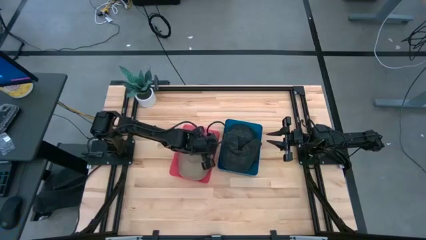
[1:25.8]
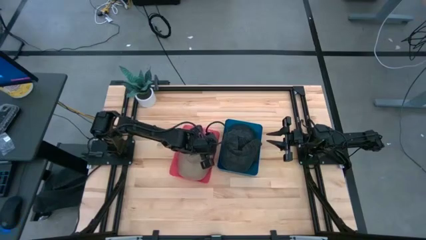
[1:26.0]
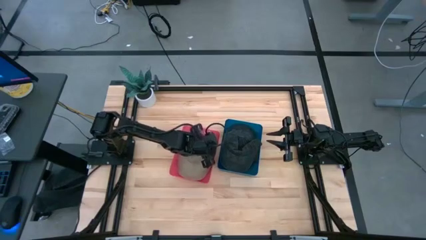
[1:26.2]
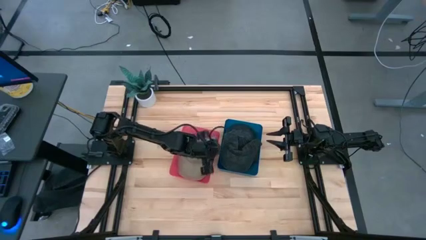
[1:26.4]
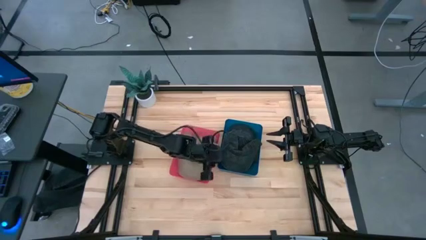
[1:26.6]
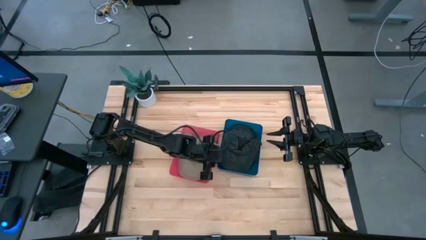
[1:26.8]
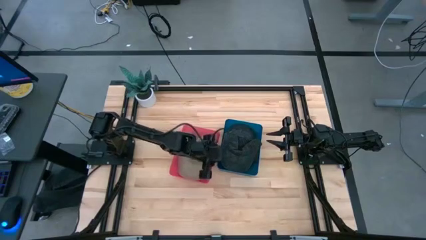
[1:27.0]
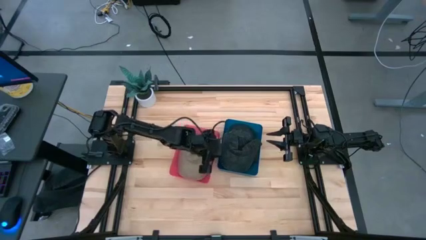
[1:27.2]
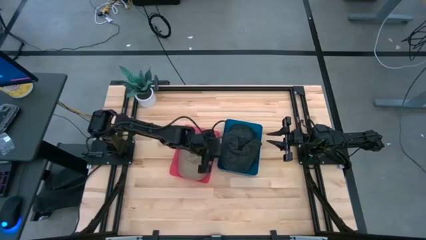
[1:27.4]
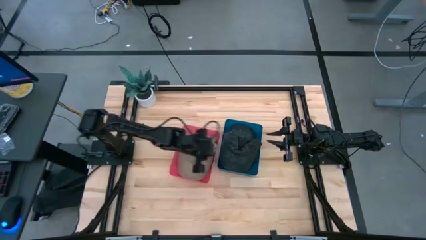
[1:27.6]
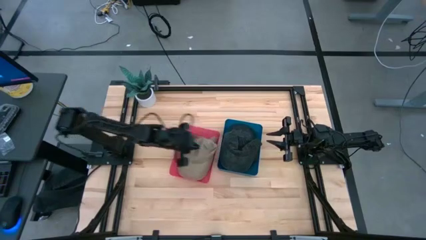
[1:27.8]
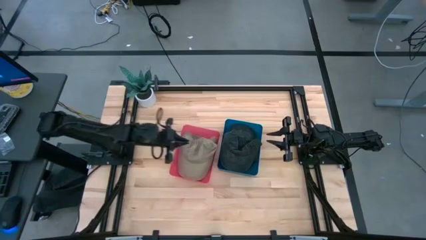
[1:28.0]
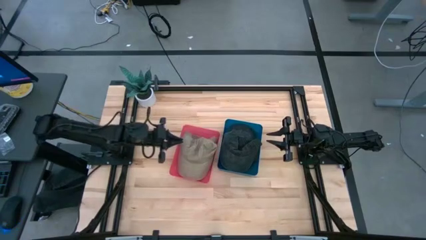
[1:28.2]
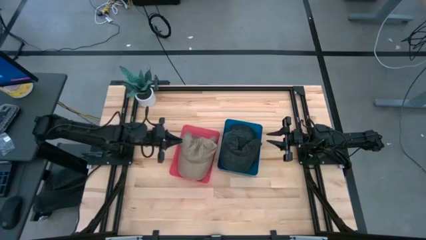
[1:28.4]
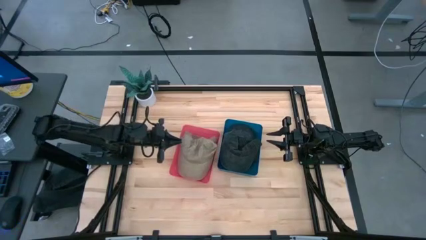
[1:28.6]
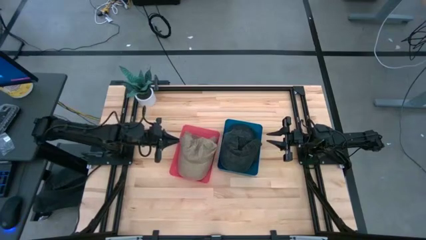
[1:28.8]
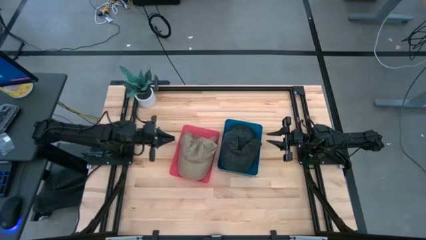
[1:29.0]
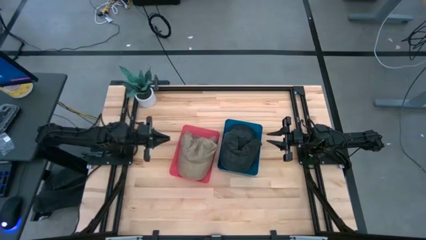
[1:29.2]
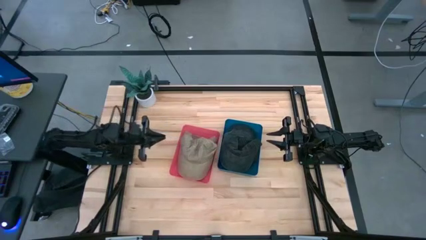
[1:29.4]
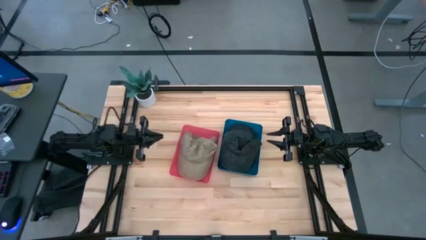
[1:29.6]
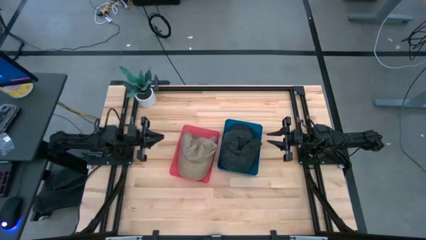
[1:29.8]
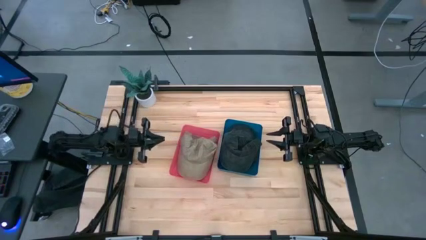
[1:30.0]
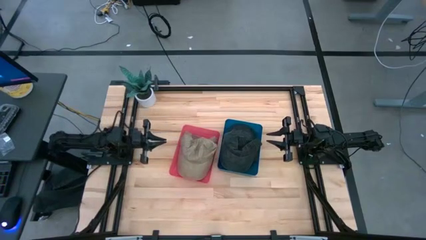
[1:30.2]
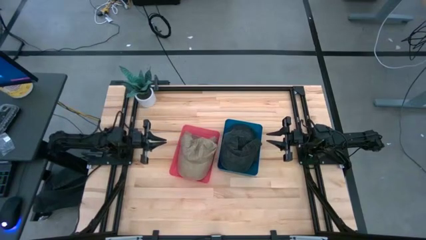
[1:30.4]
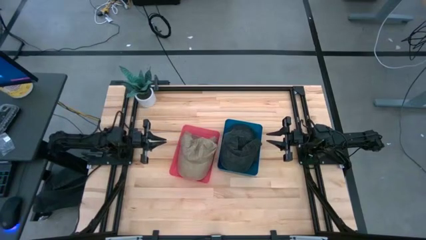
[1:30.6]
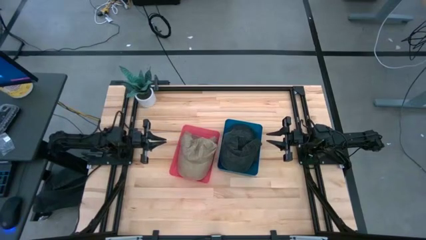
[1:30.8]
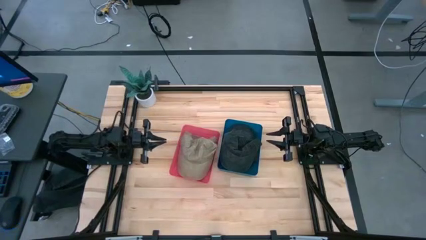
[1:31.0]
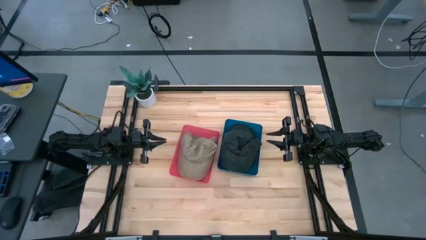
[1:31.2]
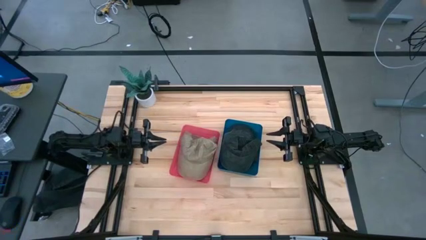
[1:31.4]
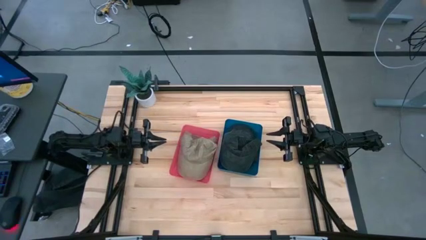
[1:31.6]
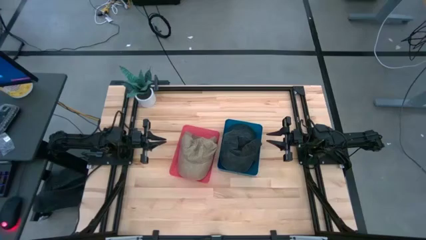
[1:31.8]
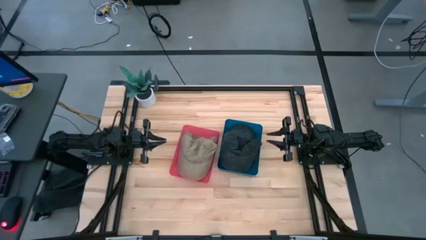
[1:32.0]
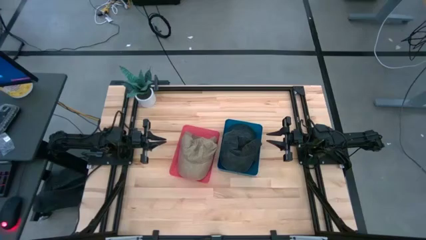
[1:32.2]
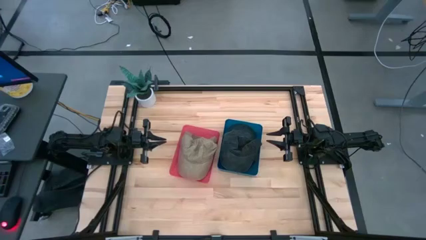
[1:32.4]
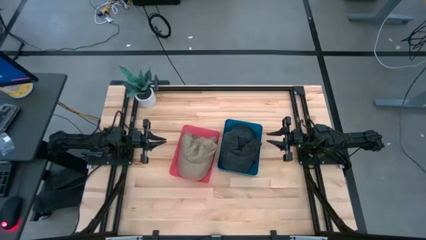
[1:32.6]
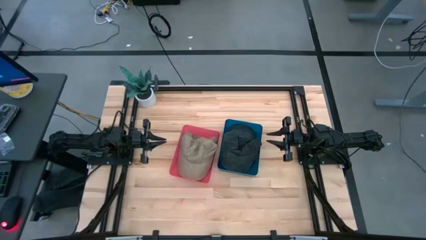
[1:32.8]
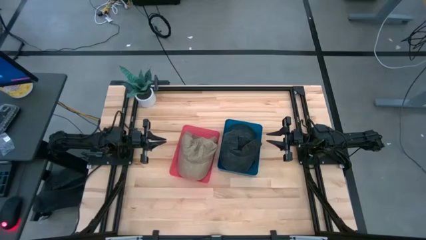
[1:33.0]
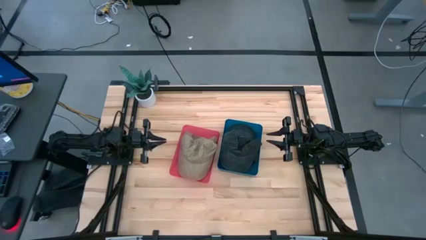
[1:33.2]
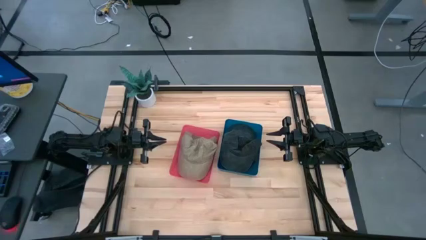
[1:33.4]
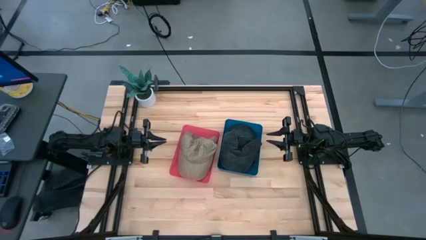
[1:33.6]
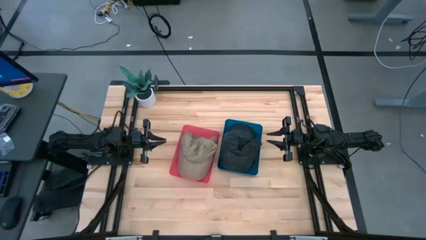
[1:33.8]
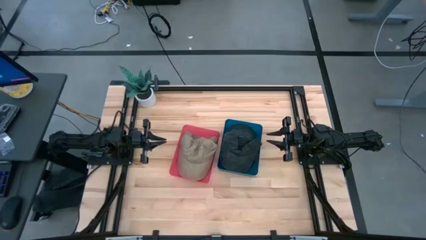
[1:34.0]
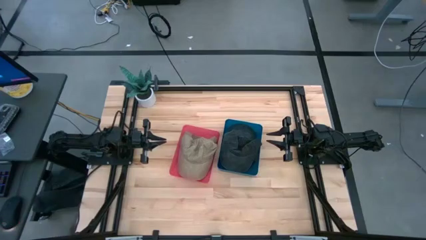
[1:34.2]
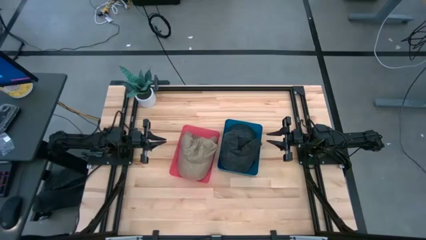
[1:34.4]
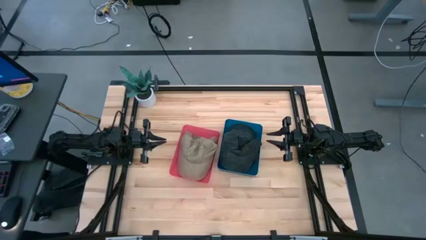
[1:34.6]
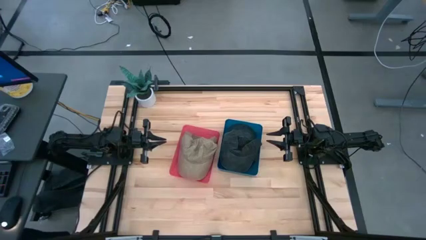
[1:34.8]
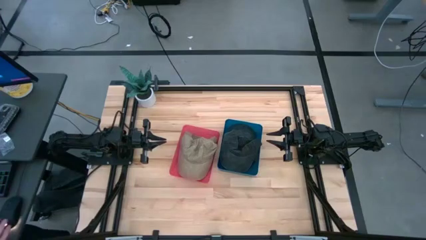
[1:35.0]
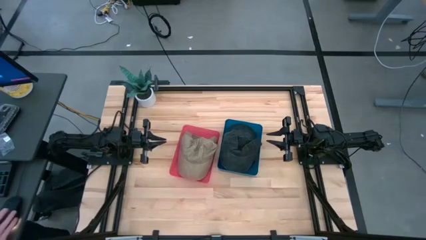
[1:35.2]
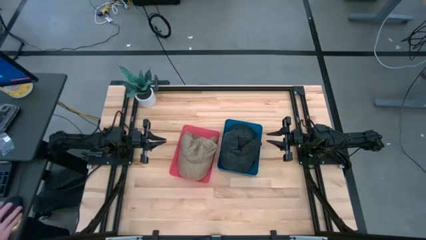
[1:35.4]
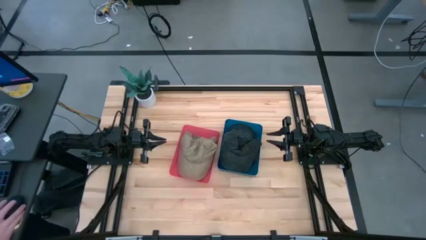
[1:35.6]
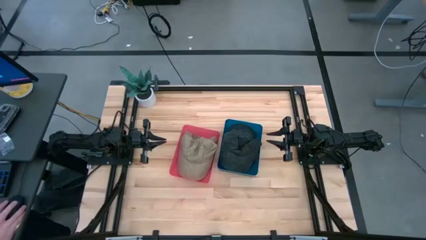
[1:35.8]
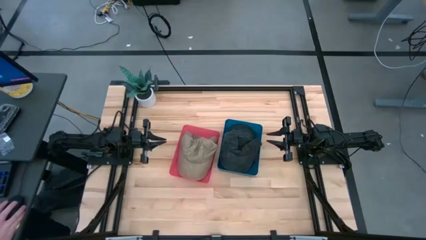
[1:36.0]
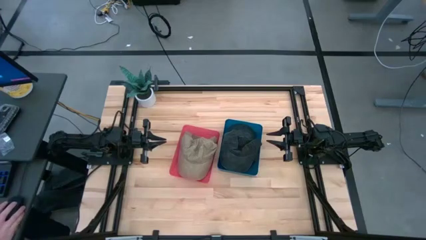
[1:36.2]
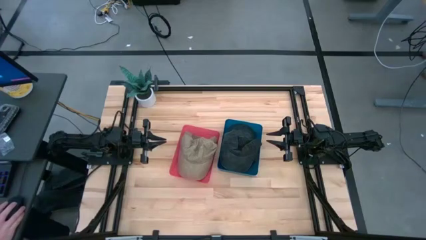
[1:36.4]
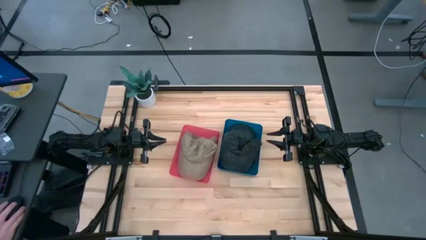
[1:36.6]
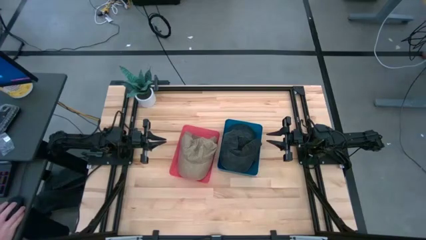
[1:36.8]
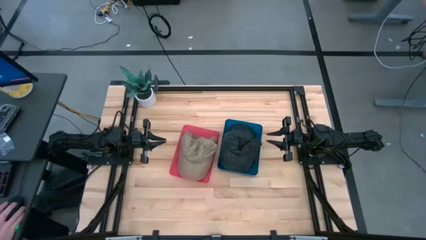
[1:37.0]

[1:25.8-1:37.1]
Task: Pick & Place hat
Return to Home Position

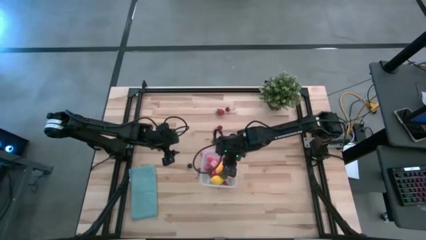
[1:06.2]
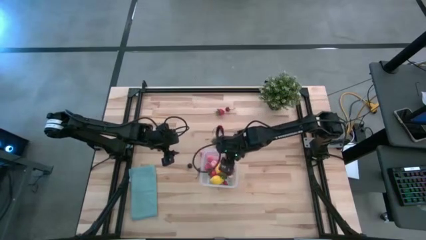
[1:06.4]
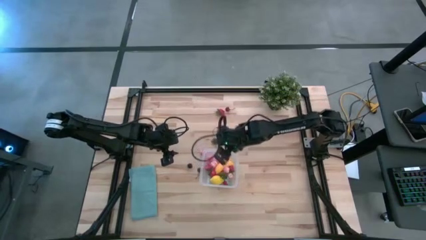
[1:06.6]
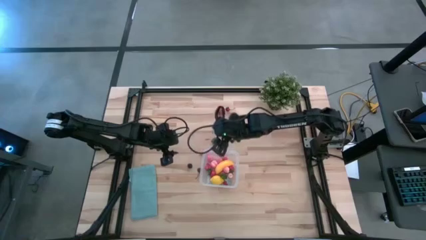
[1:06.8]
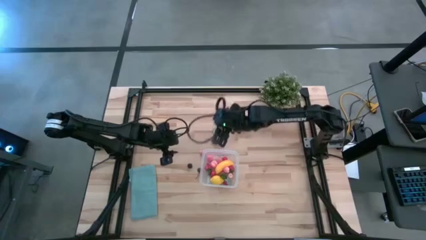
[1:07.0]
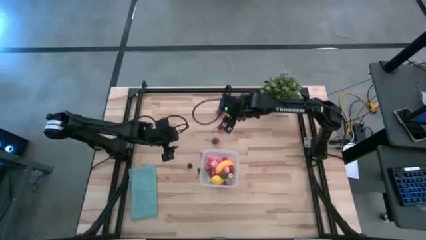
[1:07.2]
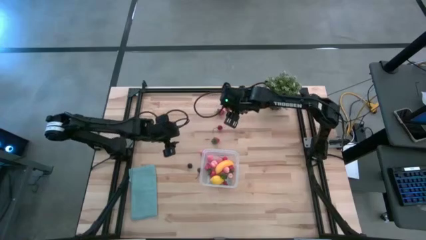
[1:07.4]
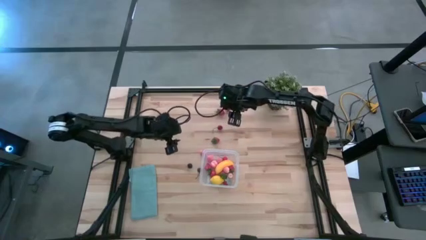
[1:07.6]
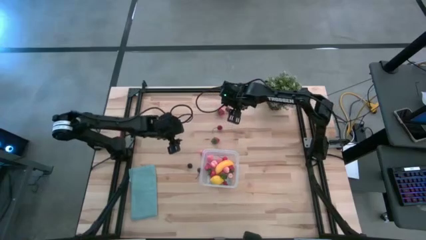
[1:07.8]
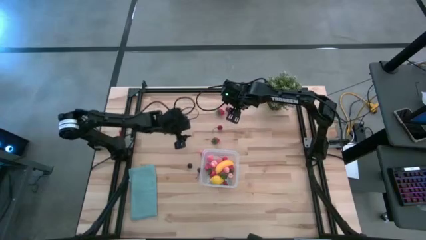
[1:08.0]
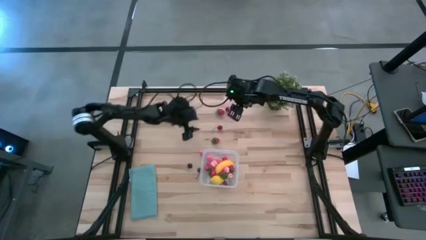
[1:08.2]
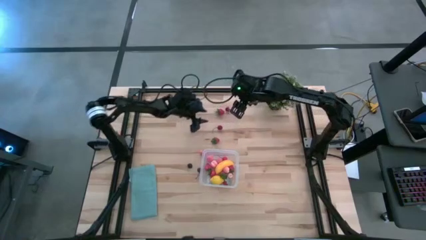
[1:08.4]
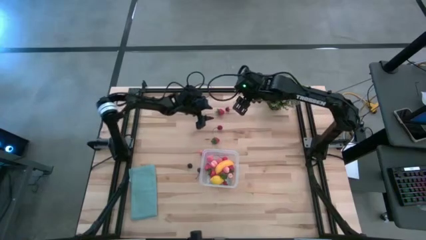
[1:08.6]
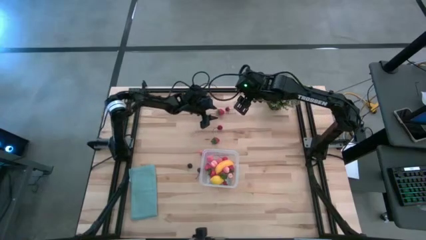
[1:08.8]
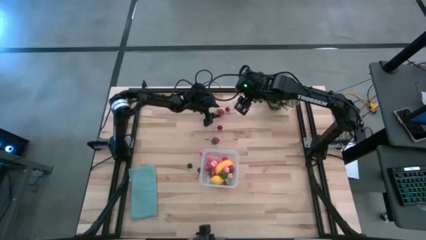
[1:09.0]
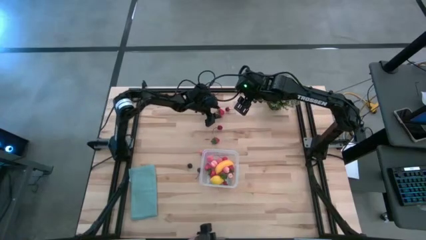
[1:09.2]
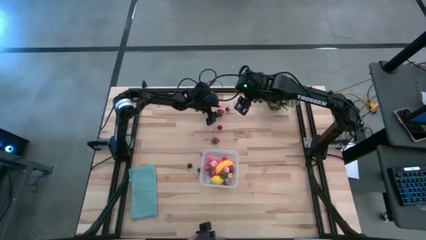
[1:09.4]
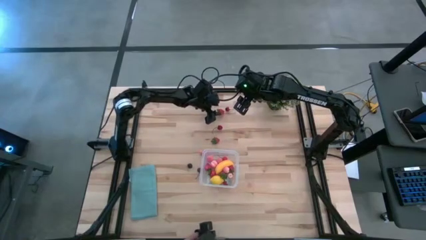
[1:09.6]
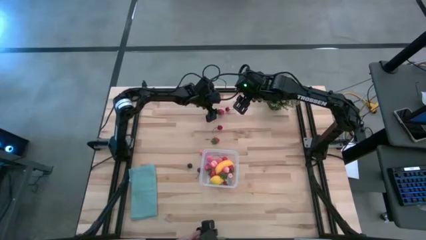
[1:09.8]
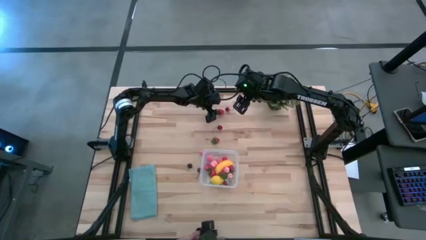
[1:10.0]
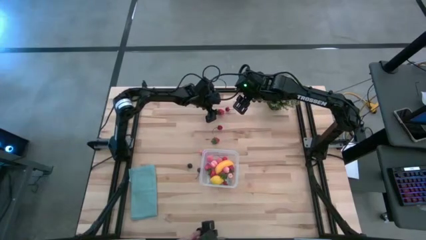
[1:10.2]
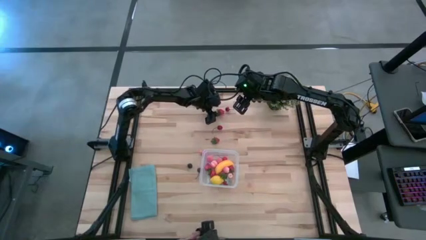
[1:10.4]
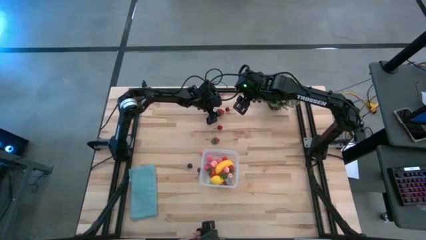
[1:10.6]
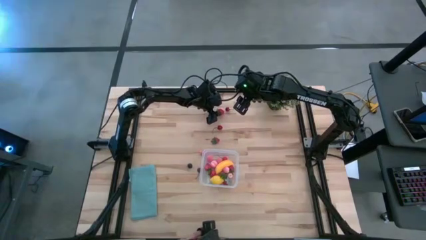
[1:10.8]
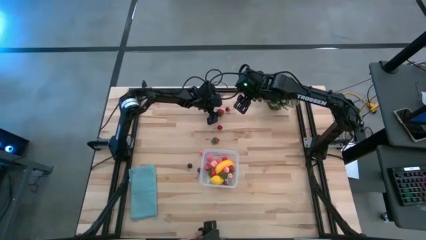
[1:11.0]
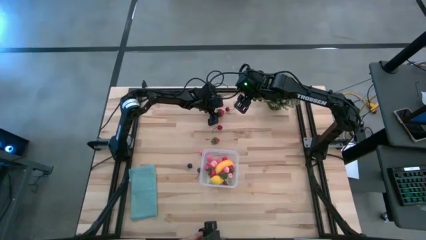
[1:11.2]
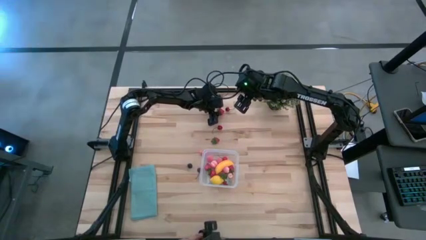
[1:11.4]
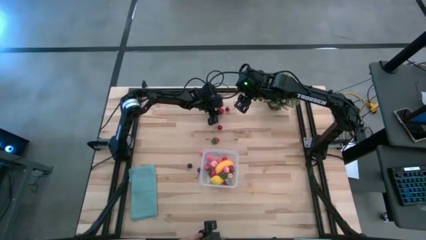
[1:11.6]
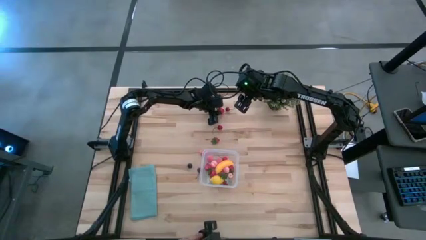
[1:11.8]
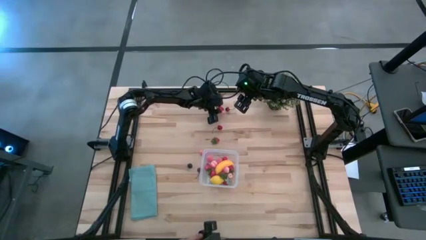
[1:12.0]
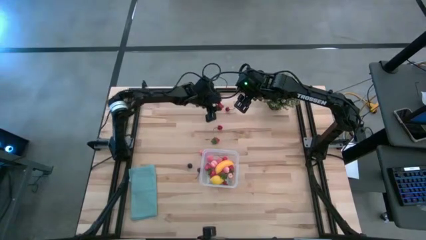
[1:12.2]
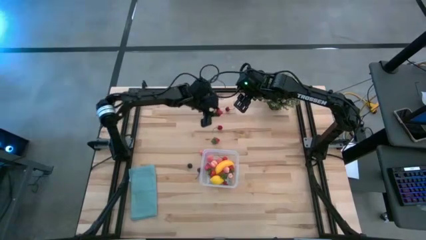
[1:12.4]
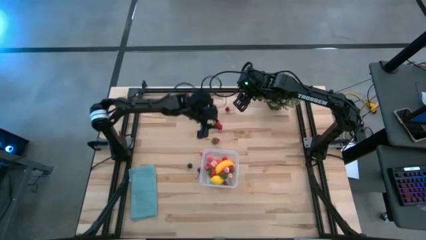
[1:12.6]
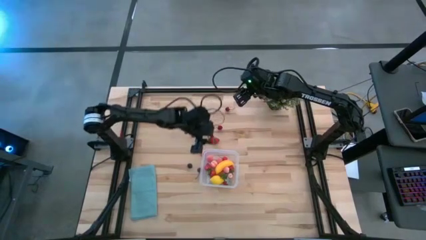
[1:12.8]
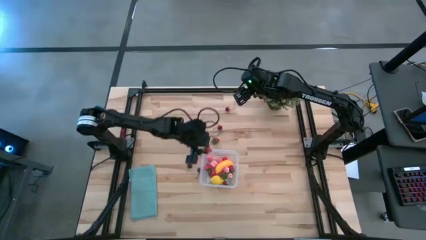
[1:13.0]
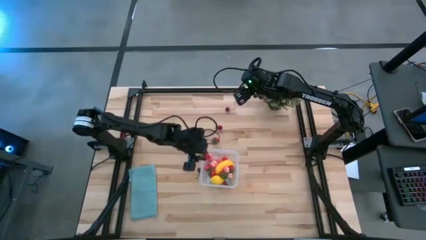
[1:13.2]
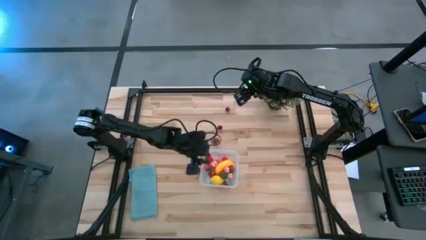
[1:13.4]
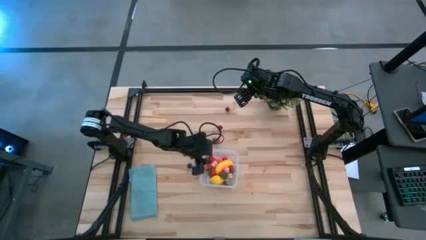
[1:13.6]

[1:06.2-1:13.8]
Task: Pick and placing Produce into tupperware
Put the red strawberry into the transparent container
